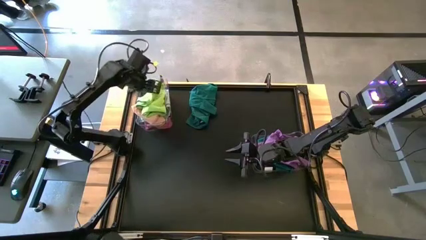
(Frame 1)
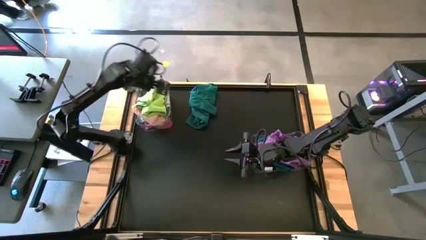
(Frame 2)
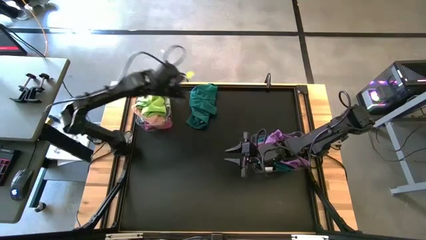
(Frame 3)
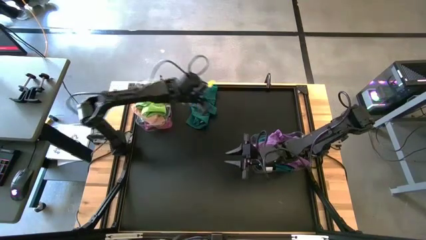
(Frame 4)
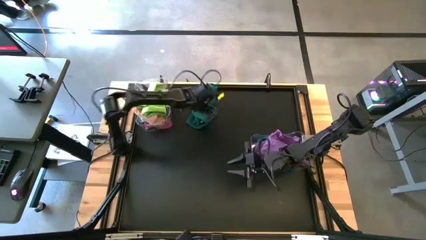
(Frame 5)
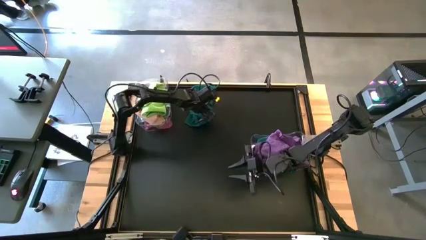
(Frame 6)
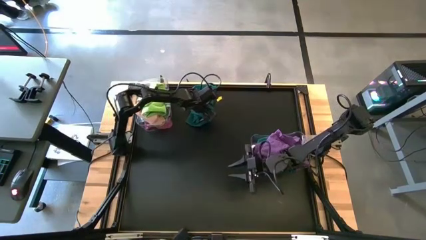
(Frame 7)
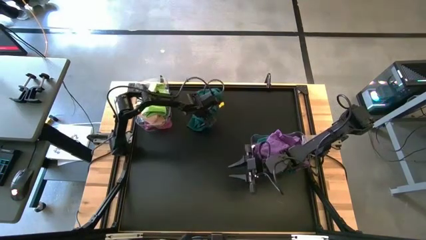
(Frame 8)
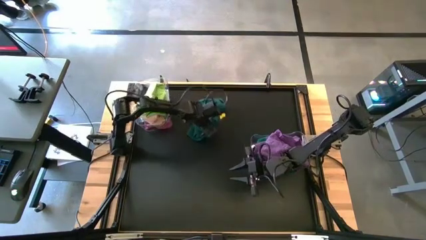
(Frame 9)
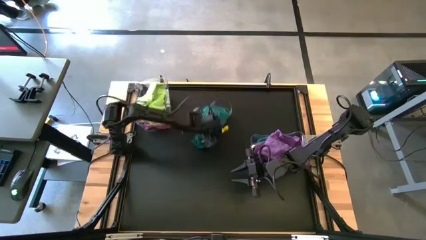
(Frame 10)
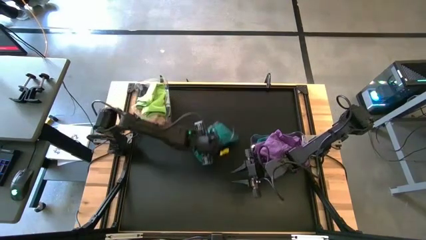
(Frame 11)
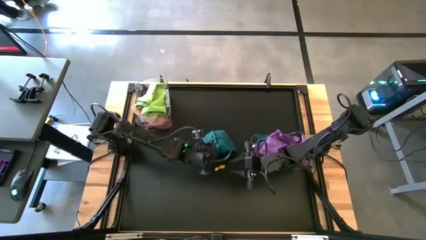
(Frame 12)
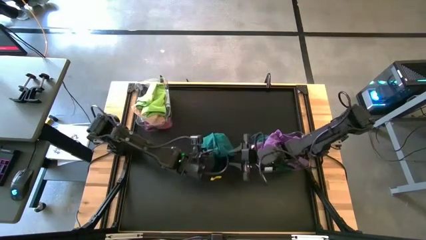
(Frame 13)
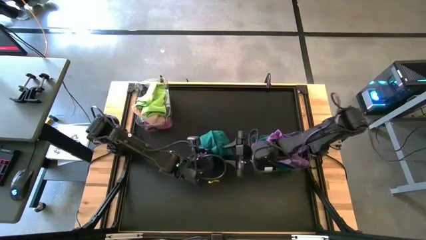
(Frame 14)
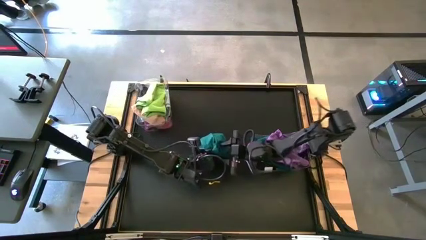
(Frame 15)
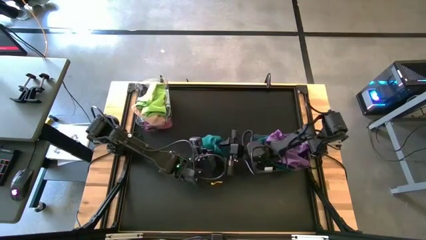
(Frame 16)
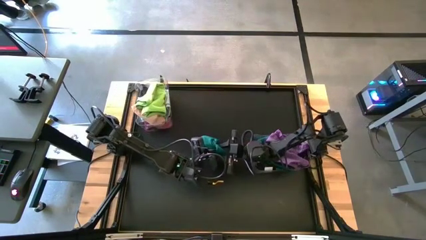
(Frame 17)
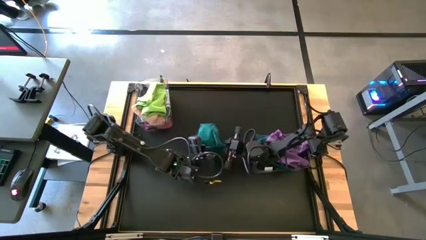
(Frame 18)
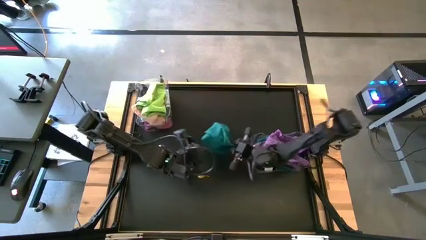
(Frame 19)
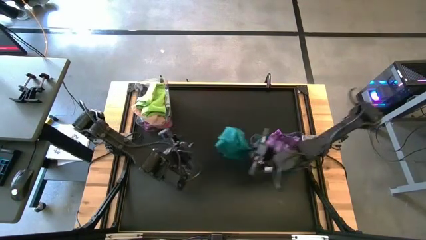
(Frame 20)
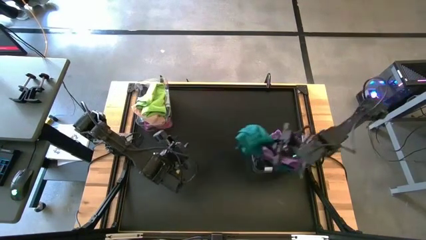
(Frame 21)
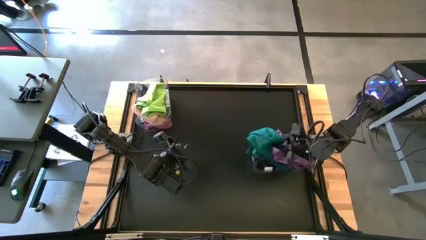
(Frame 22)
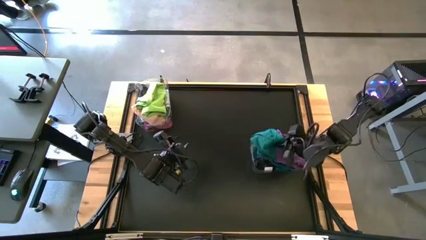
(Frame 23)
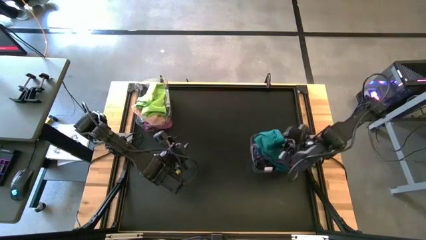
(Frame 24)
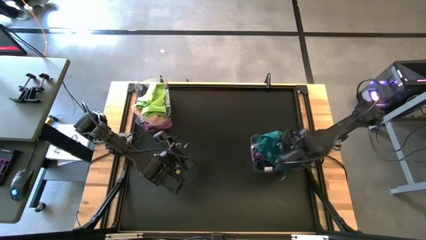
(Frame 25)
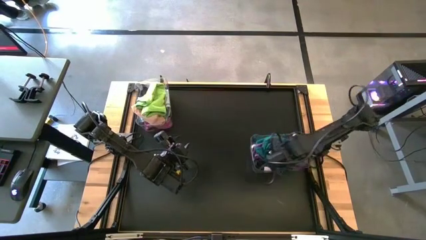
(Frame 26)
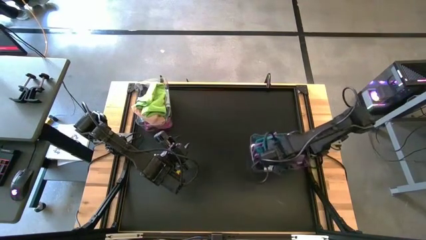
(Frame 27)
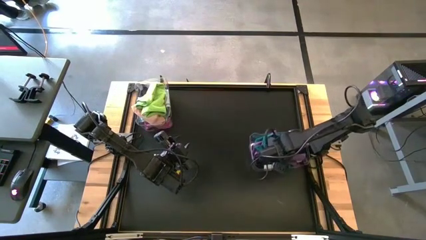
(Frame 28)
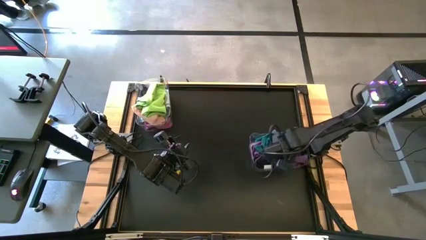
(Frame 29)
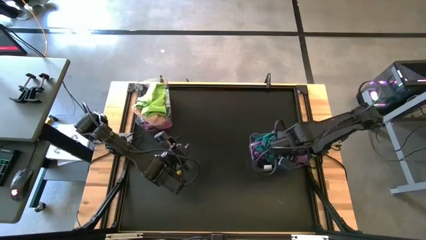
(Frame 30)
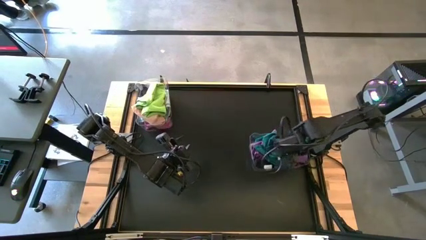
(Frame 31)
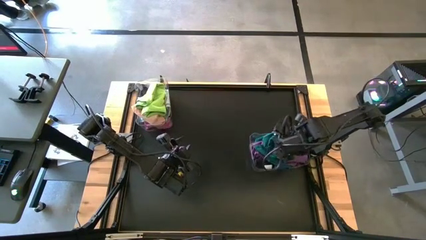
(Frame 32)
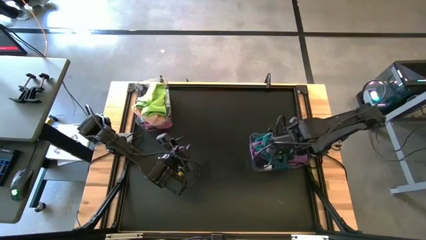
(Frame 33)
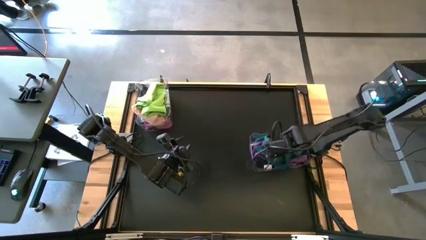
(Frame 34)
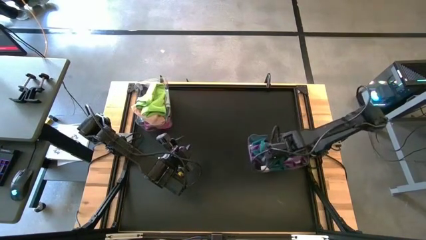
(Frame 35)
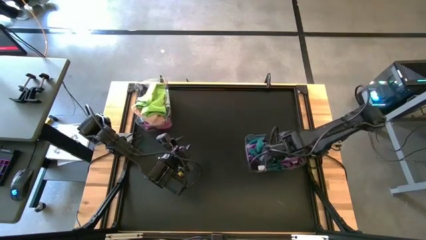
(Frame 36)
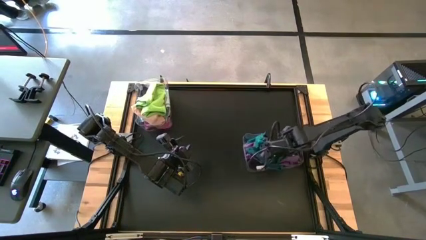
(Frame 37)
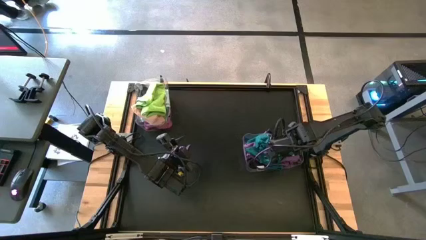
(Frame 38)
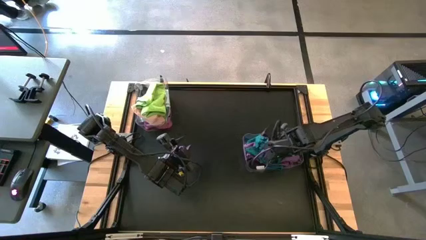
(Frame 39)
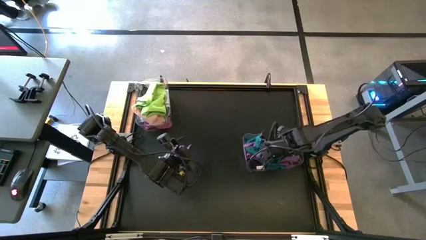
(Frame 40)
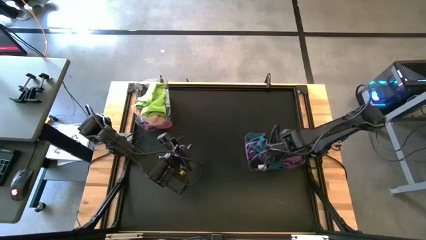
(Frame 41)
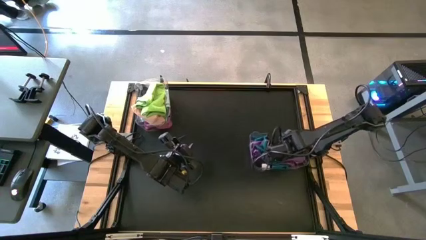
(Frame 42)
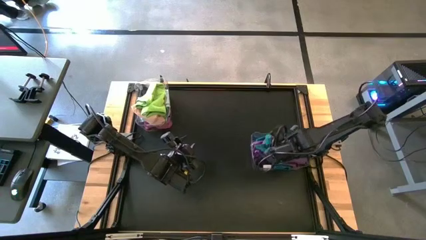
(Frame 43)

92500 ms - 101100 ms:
Task: Sort towels by color in basket
Put the green towel into the right transparent bin

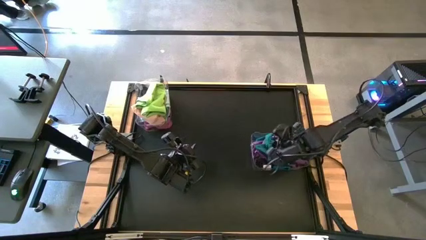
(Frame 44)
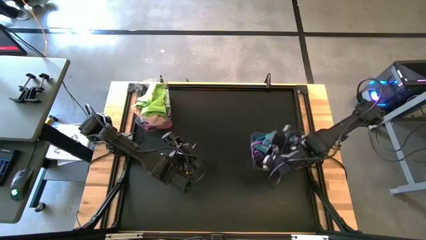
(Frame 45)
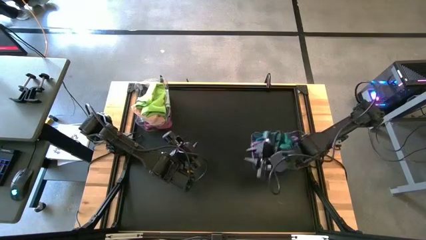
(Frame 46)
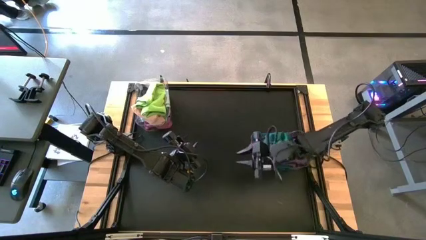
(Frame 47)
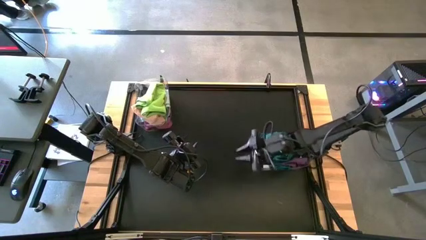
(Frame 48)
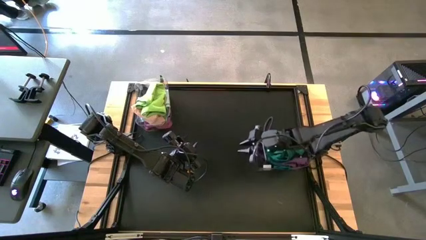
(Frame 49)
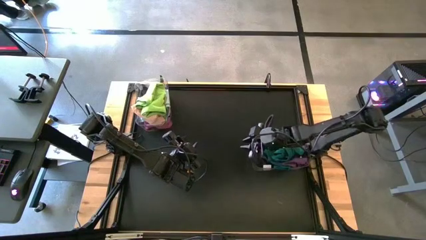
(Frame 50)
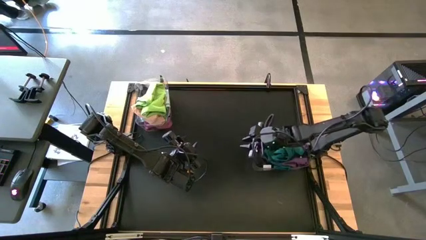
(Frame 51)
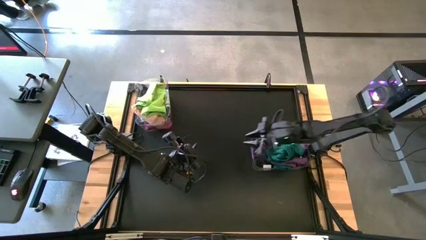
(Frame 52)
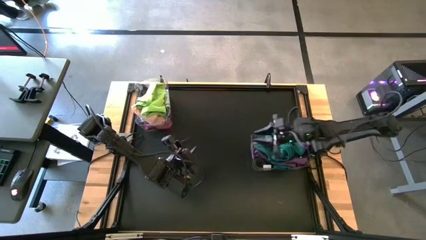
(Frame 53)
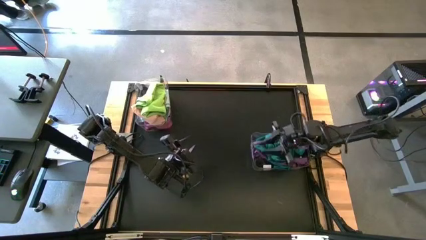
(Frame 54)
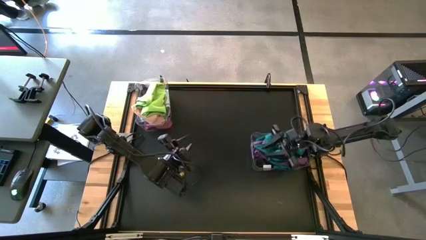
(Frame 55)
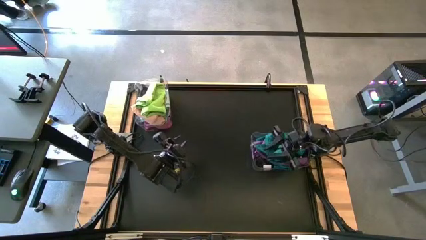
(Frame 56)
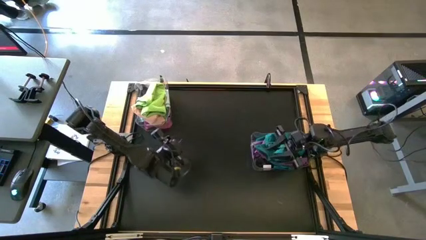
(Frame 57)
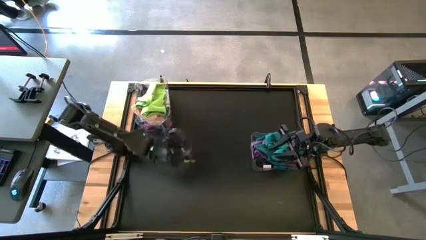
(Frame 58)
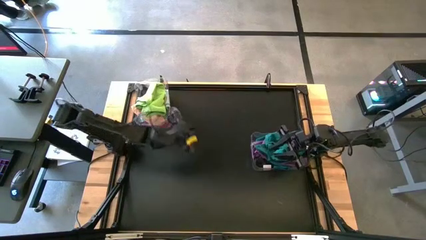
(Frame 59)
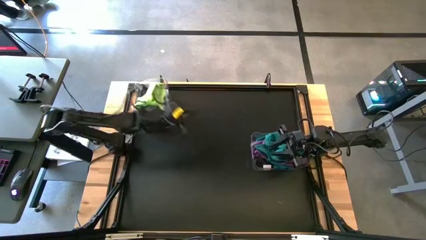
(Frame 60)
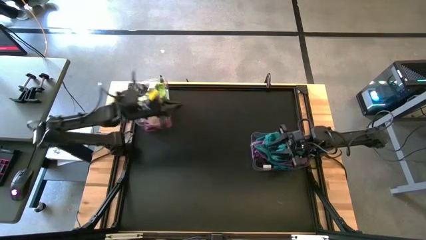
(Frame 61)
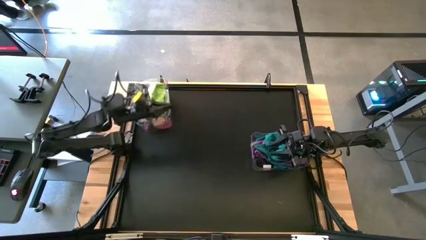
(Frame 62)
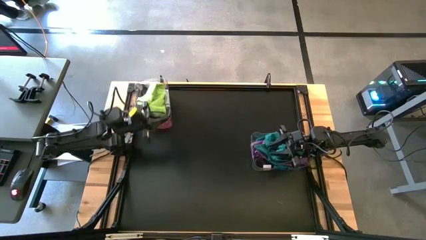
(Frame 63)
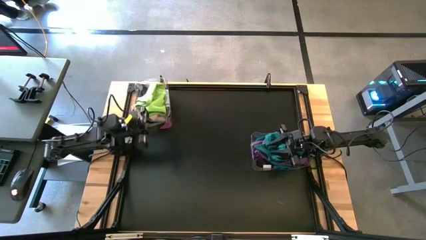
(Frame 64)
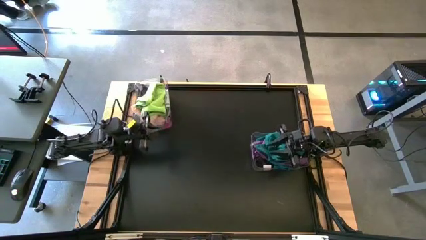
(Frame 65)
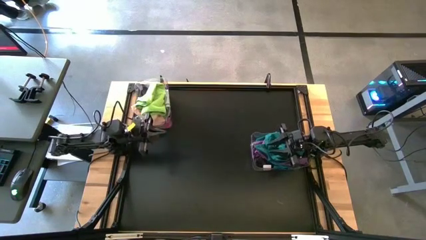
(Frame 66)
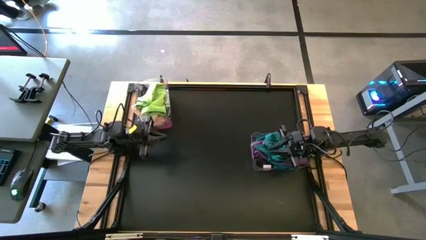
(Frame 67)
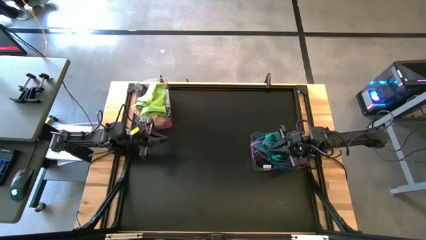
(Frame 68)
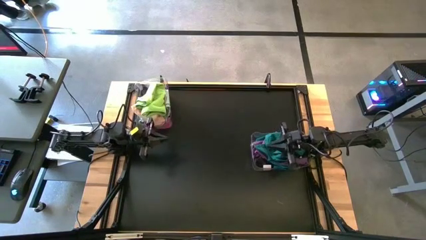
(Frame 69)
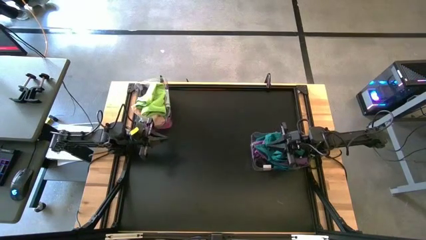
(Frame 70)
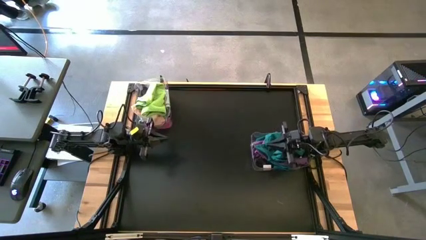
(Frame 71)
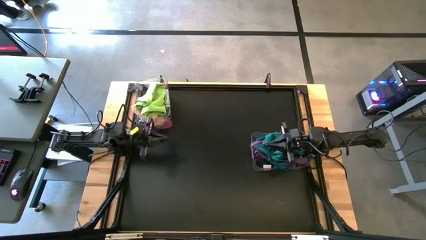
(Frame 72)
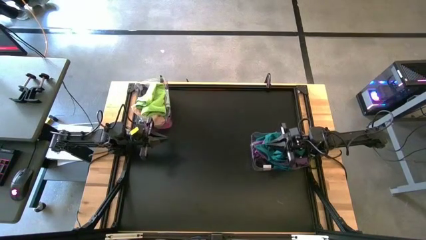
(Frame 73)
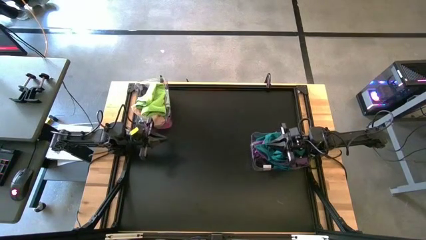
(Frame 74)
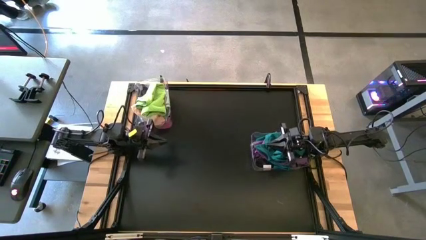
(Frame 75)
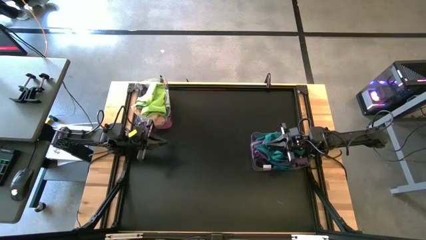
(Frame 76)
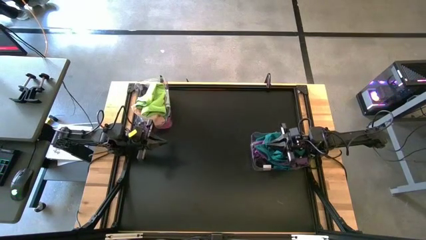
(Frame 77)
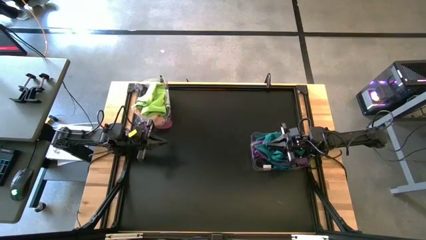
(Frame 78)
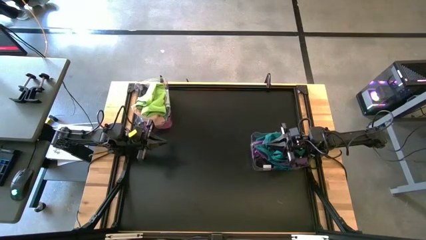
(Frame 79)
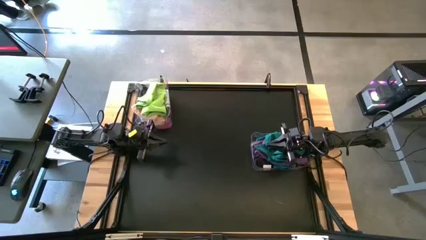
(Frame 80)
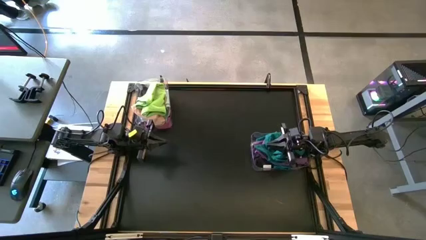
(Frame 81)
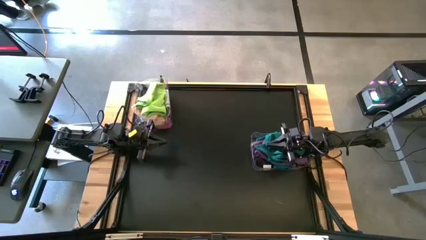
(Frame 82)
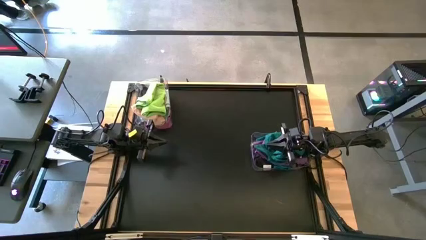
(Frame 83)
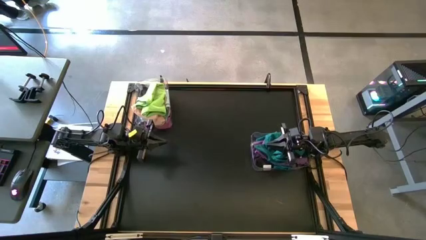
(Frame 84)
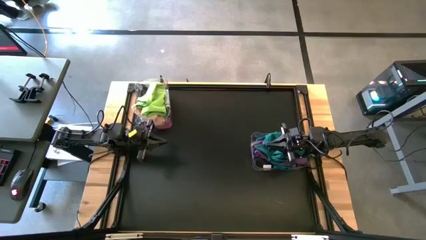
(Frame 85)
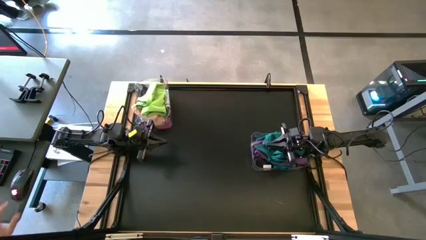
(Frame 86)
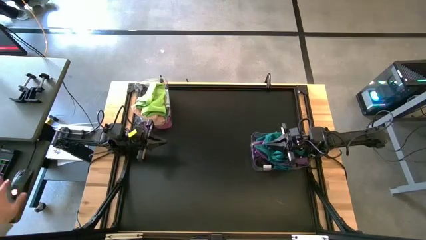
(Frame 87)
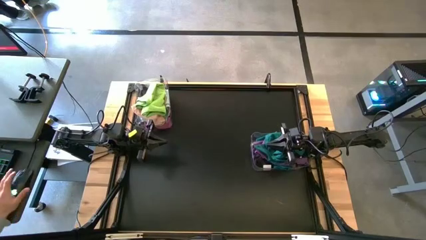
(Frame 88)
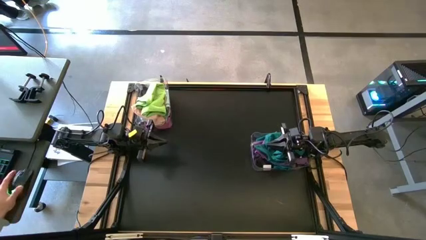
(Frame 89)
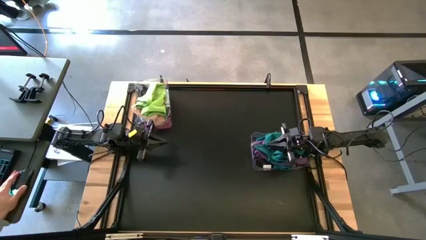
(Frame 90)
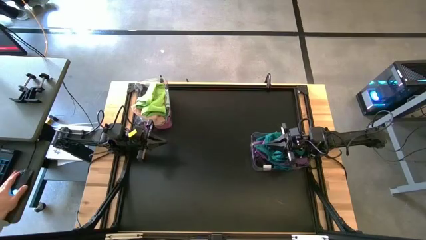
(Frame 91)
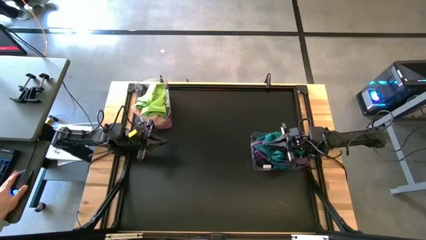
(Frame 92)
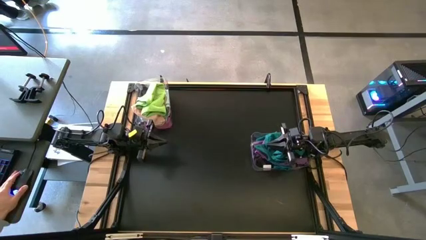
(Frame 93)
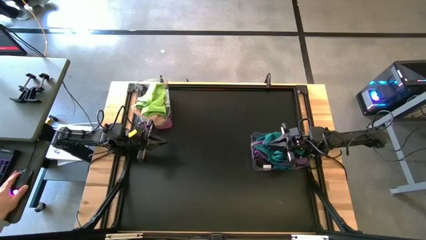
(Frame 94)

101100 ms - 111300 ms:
Return to Home Position
